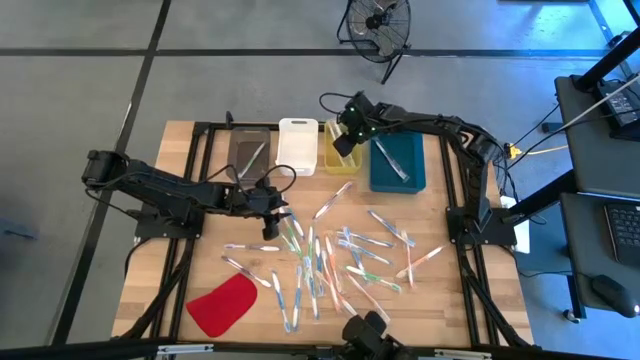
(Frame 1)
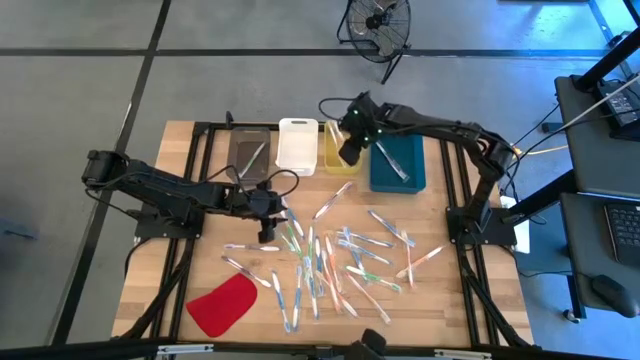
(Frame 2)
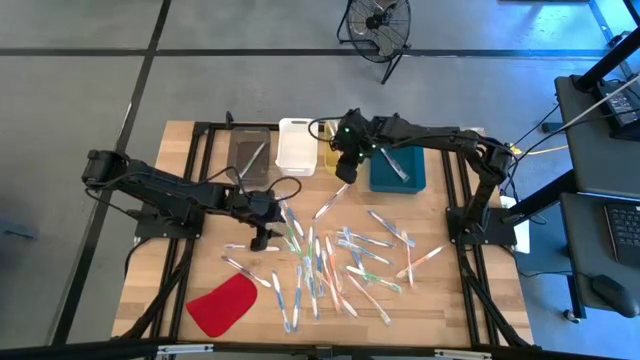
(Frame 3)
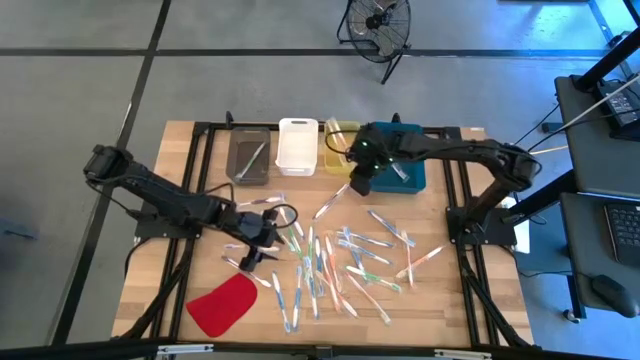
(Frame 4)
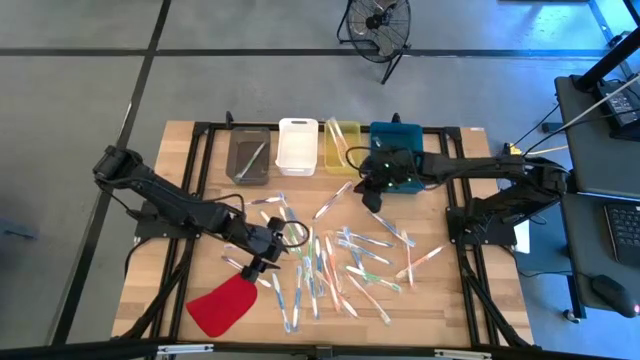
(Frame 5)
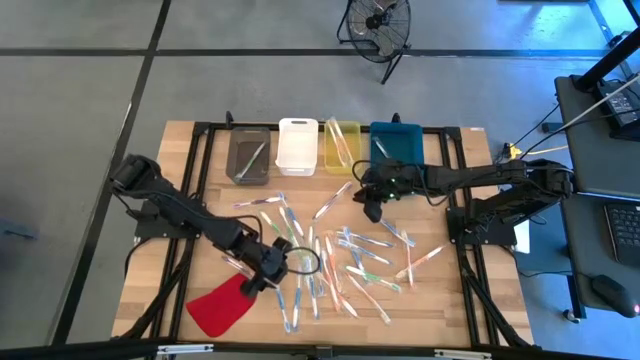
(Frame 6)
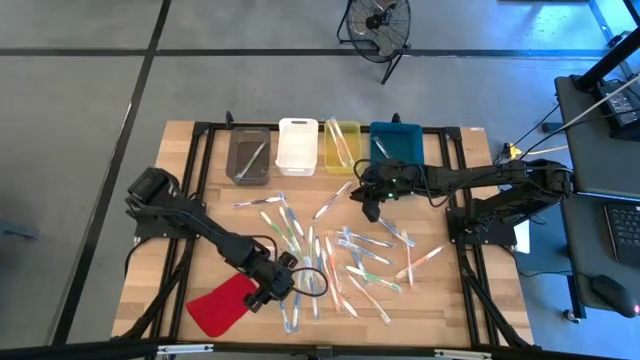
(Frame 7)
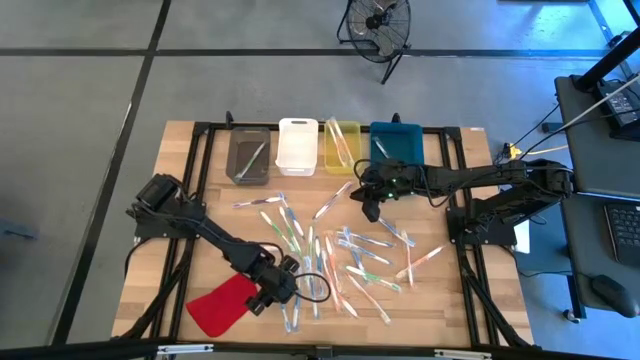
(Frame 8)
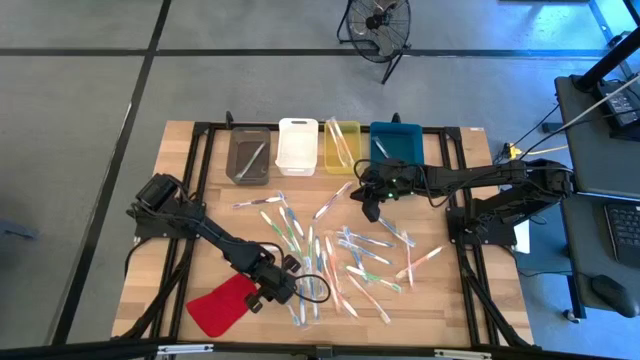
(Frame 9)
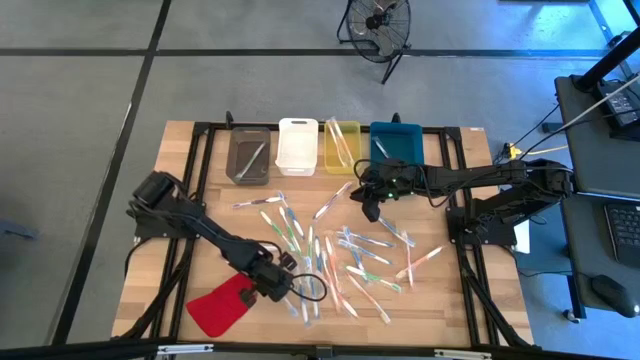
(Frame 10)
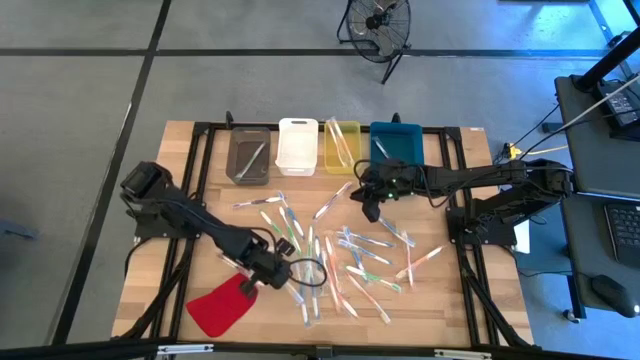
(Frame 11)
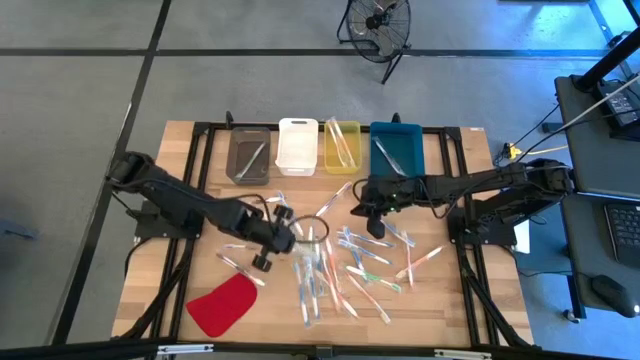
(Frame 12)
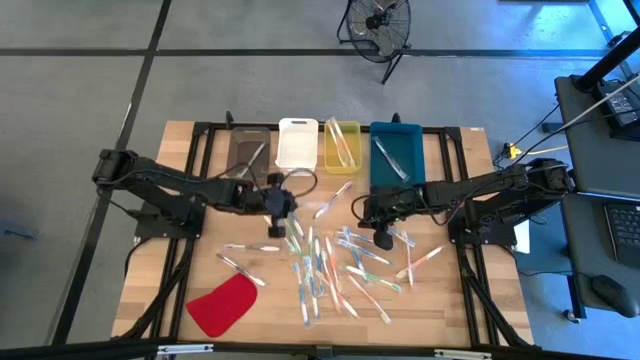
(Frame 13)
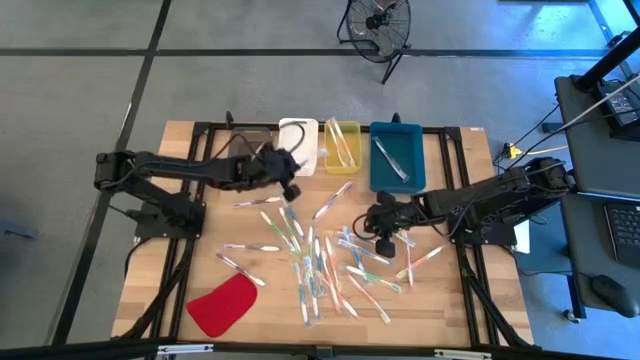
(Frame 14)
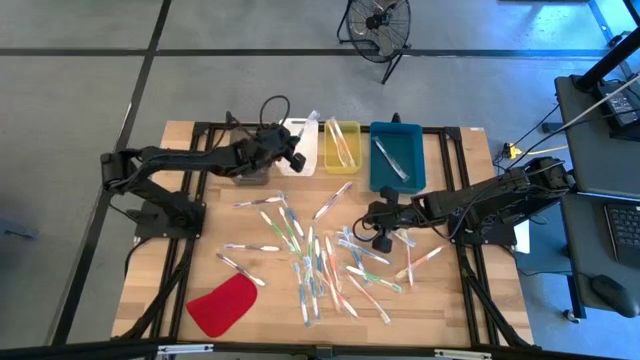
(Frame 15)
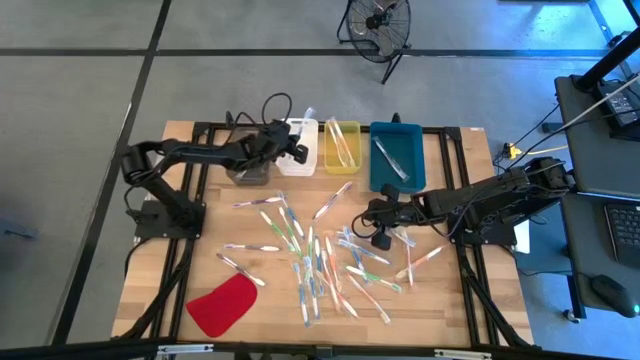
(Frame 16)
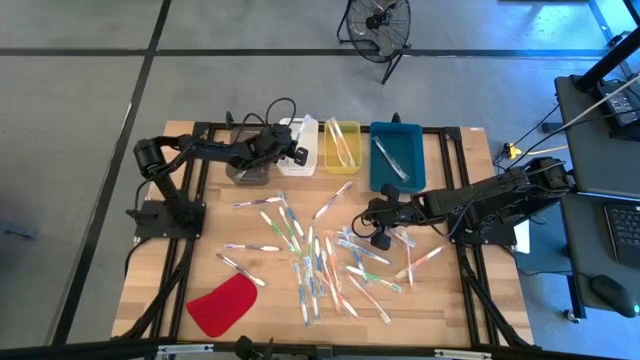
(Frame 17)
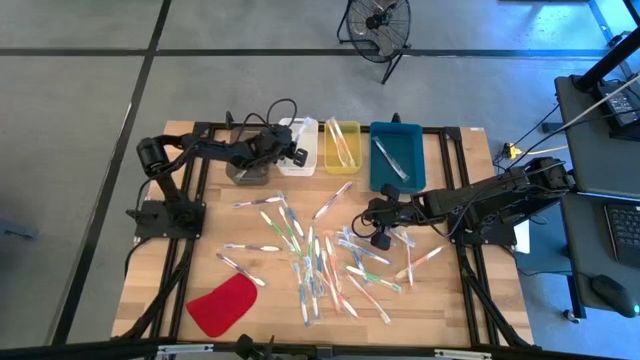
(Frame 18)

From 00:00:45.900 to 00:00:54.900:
Task: Pick & Place Toothbrushes
Put the blue toothbrush into the white bin

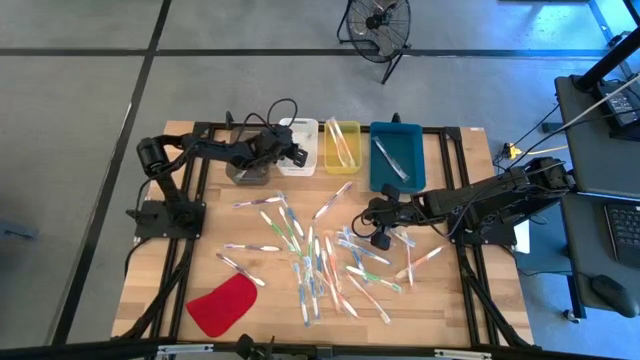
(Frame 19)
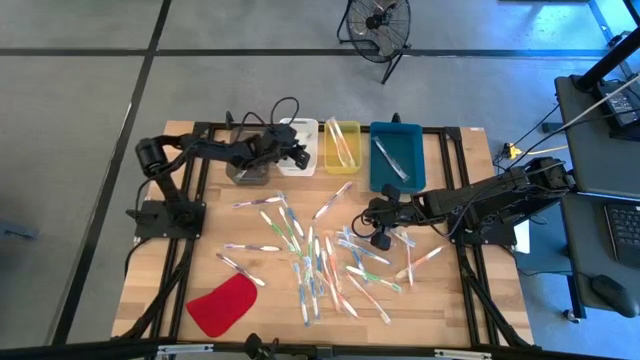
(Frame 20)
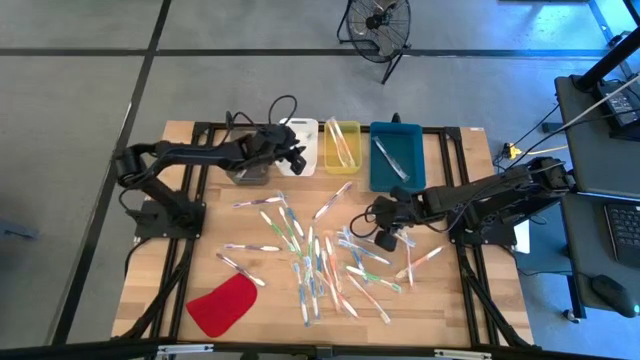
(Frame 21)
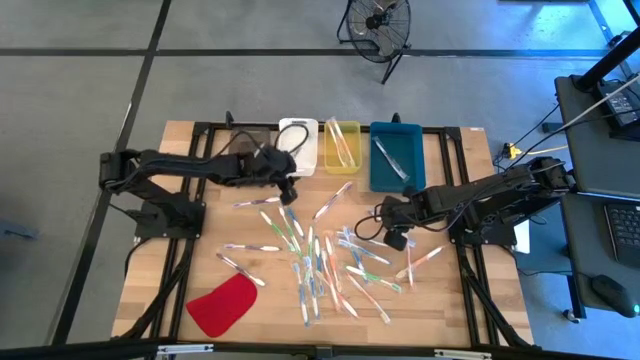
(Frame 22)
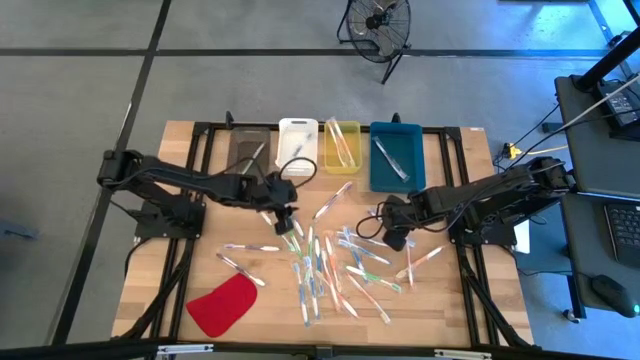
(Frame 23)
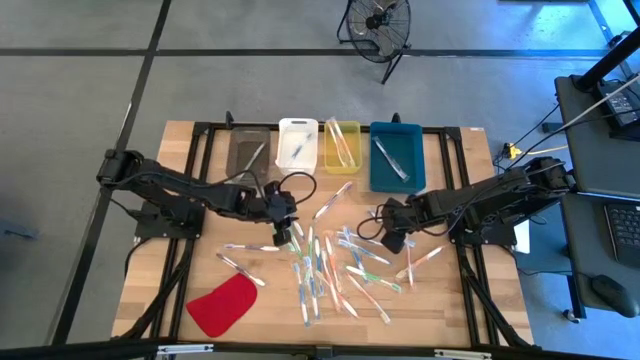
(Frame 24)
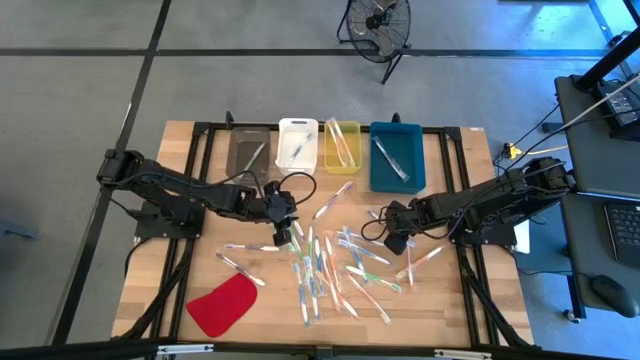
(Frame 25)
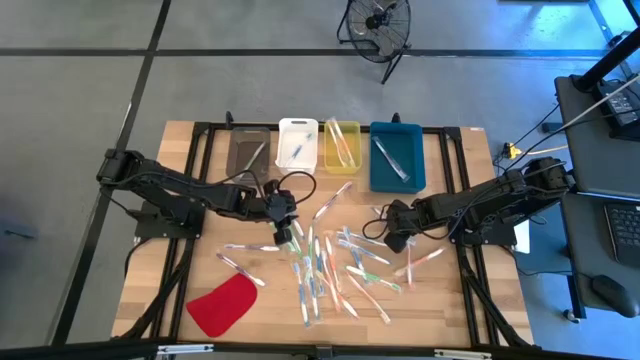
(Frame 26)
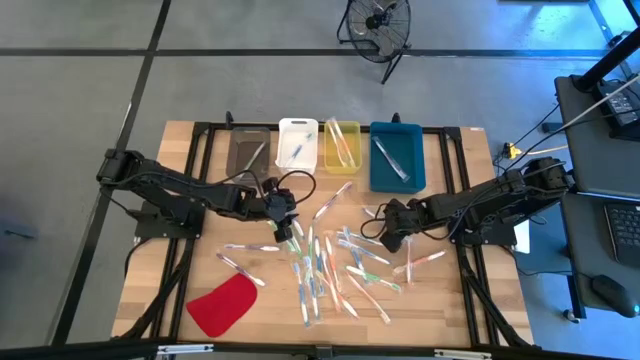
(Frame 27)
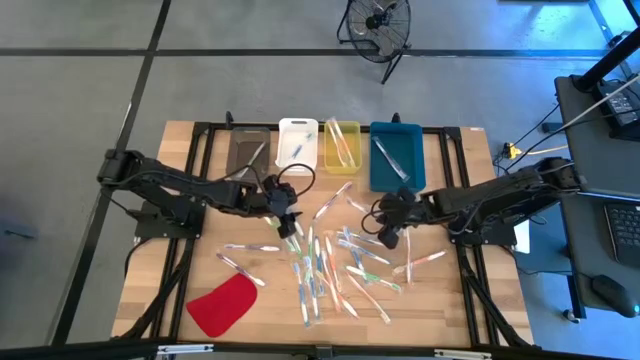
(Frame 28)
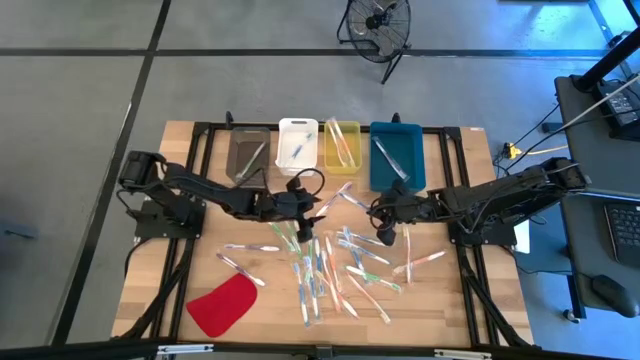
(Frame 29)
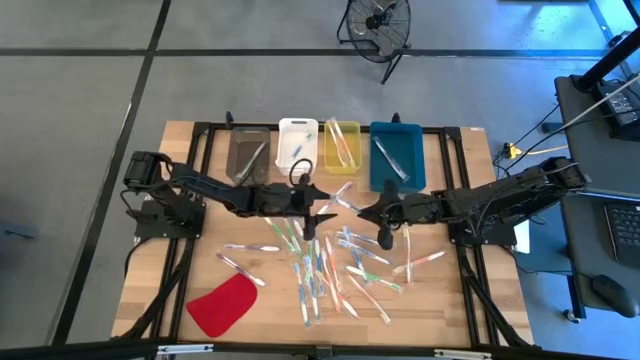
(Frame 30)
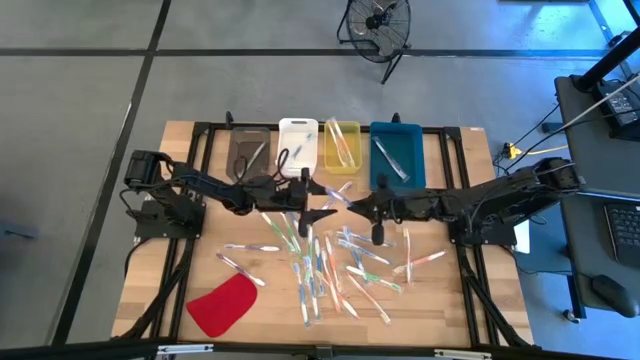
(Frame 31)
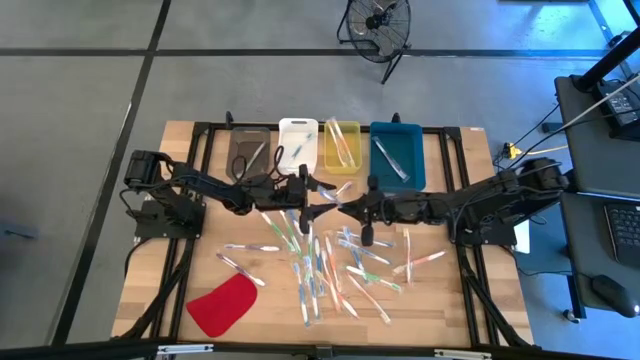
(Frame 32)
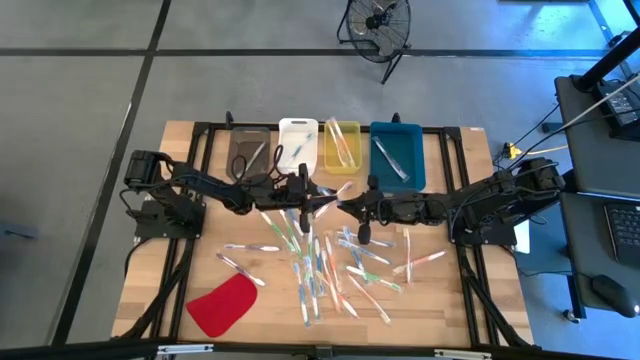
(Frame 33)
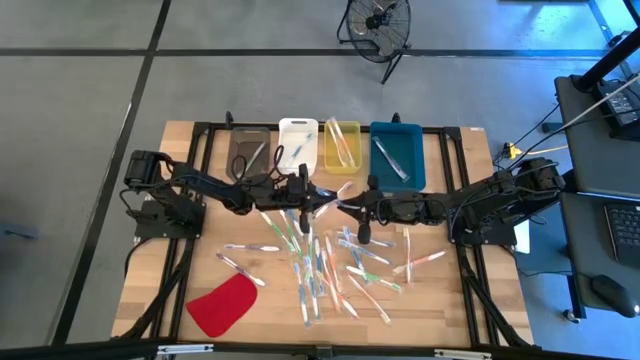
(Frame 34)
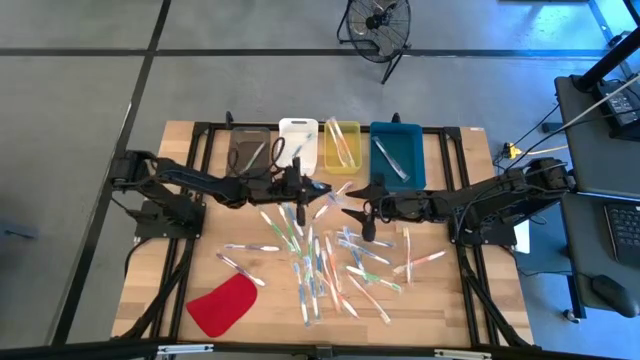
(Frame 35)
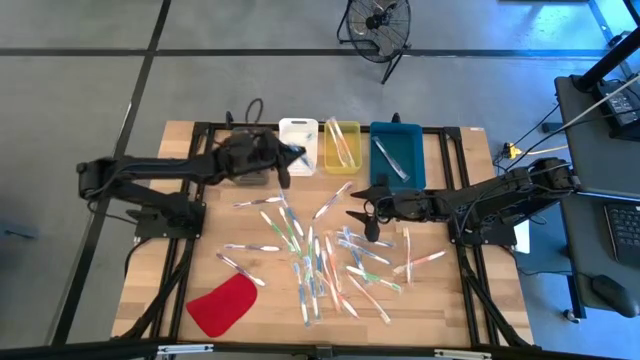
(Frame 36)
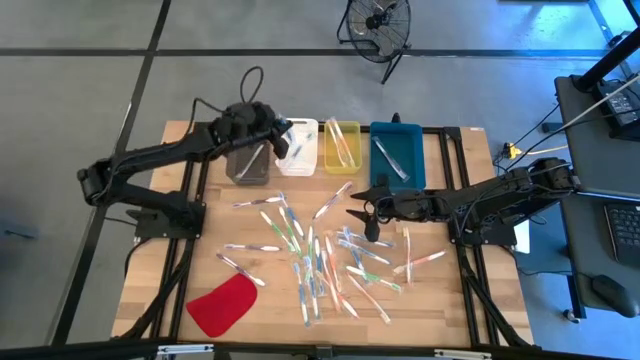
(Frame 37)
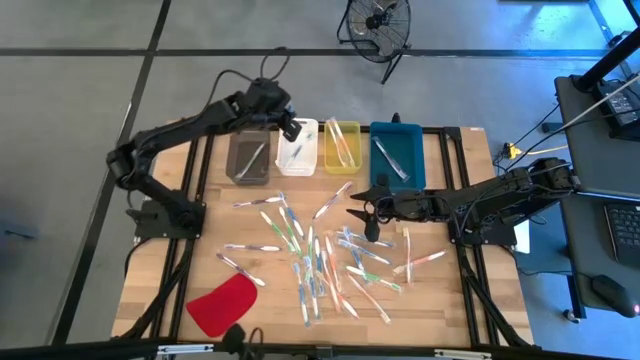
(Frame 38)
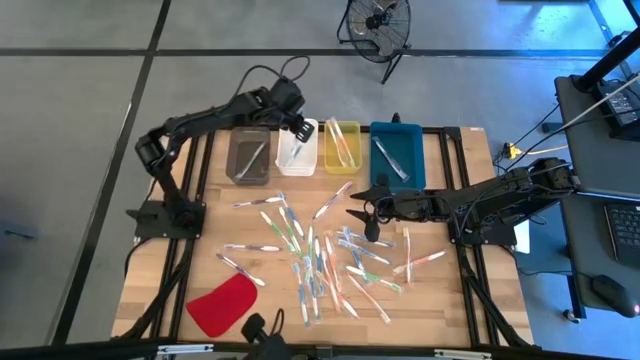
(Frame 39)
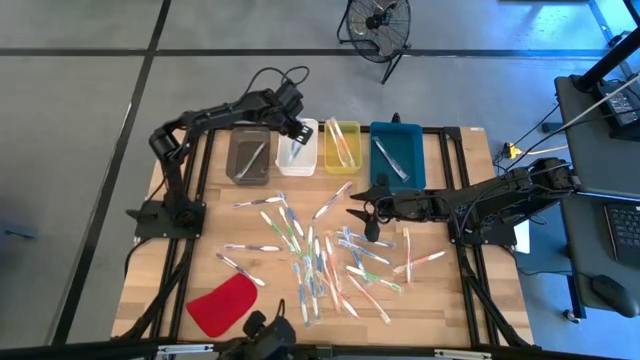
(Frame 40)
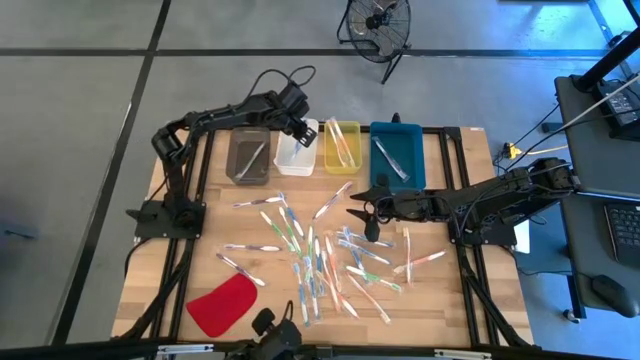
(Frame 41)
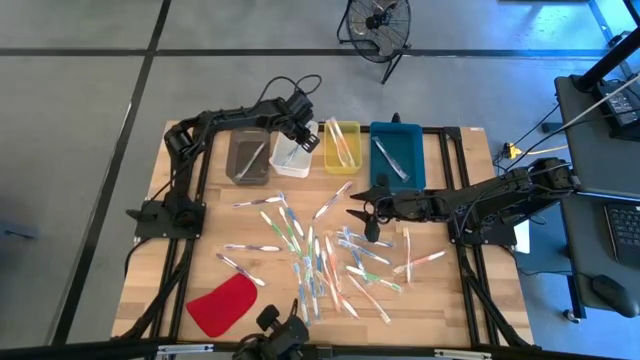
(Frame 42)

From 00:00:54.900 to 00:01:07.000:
Put the blue toothbrush into the white bin

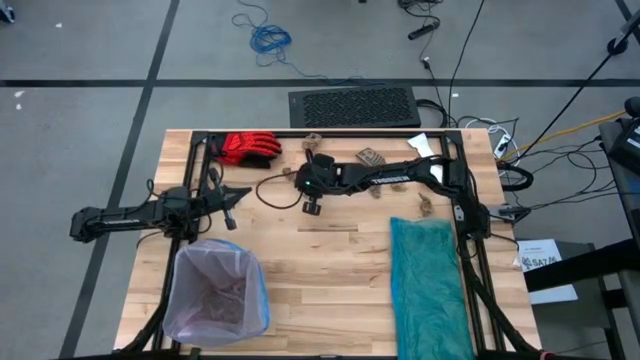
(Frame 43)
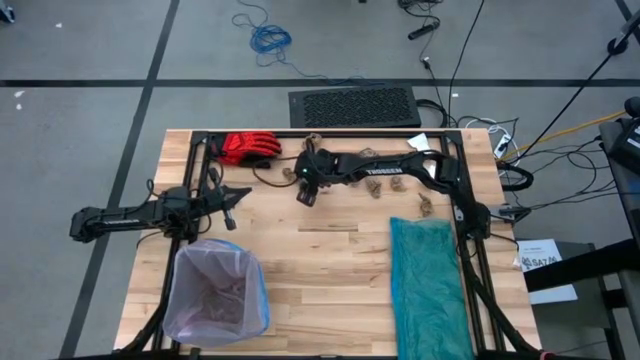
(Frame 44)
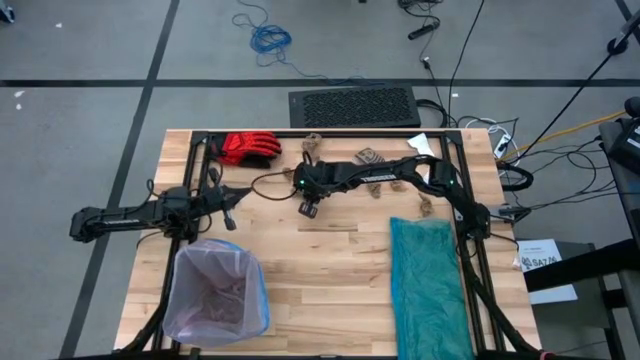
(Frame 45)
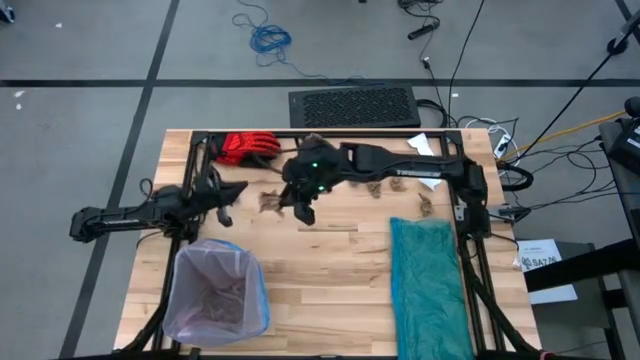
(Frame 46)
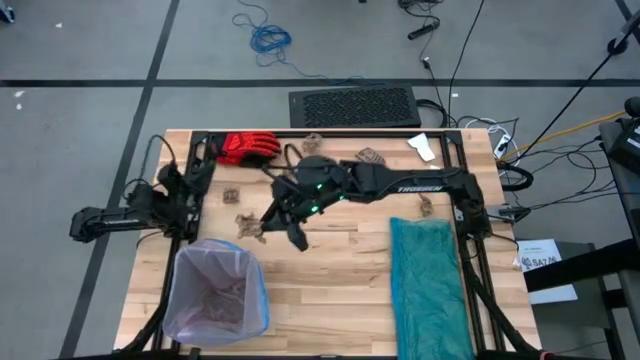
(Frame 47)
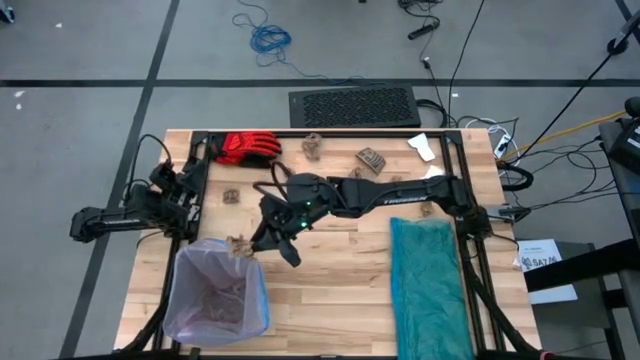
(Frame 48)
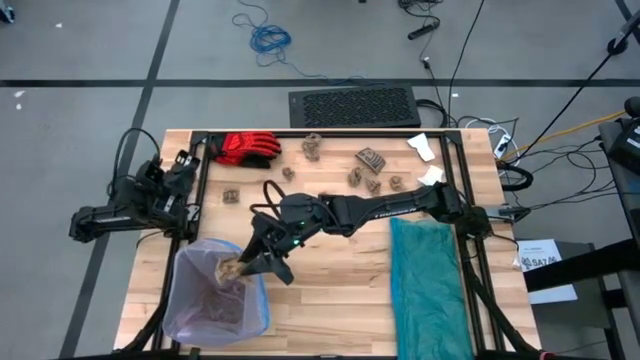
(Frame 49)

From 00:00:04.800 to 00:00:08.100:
Task: place trash/remove bag and relplace
Put the brown napkin into the trash bin
